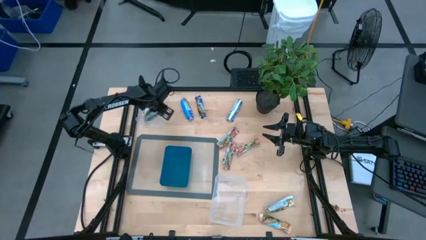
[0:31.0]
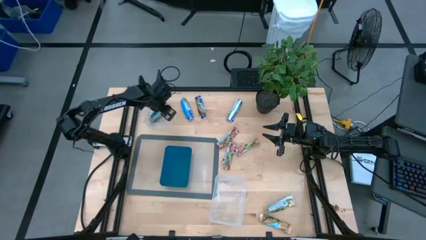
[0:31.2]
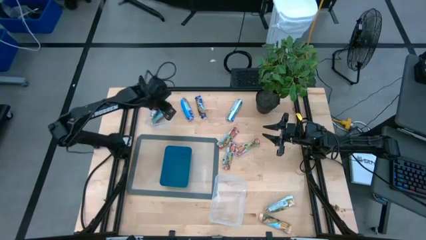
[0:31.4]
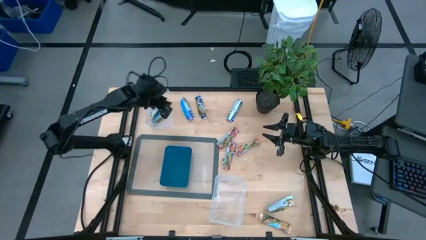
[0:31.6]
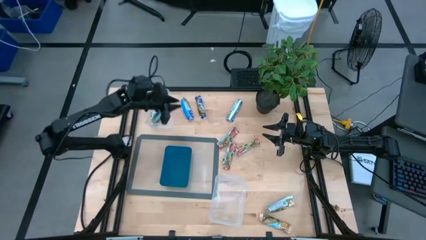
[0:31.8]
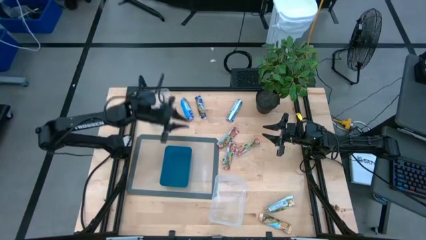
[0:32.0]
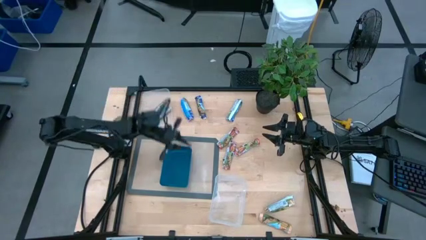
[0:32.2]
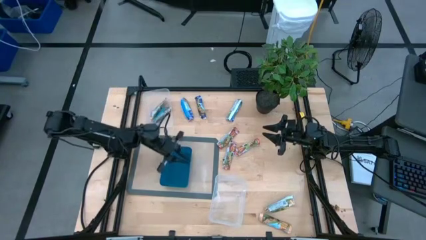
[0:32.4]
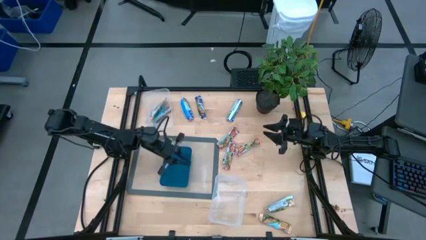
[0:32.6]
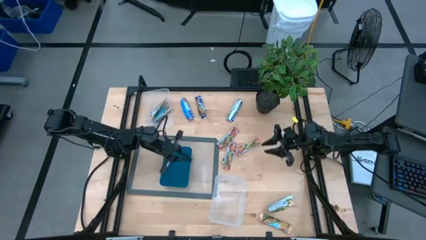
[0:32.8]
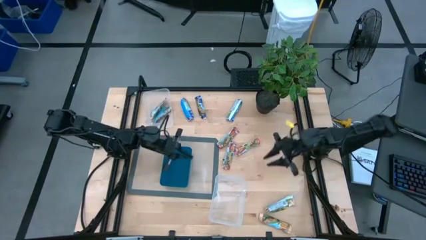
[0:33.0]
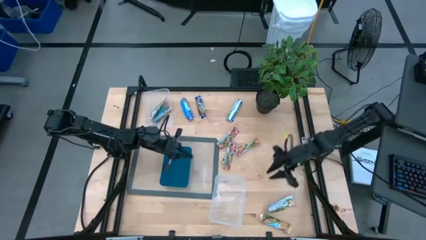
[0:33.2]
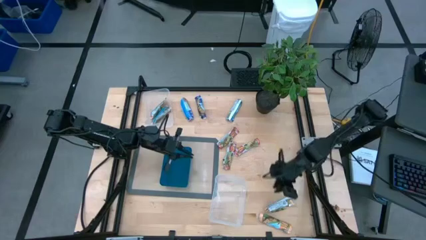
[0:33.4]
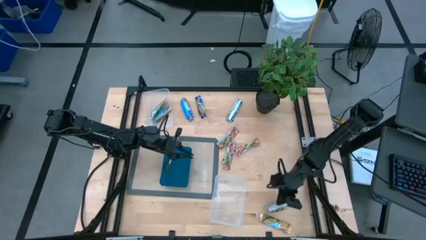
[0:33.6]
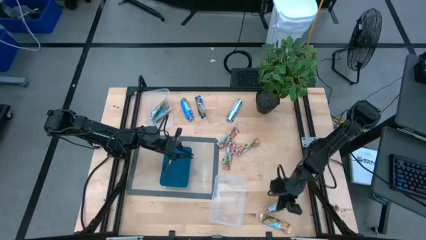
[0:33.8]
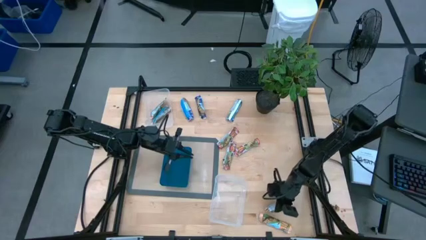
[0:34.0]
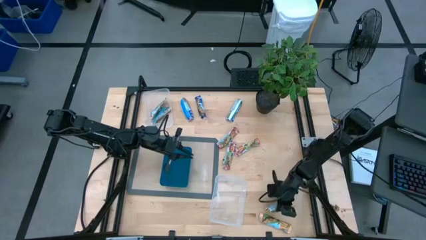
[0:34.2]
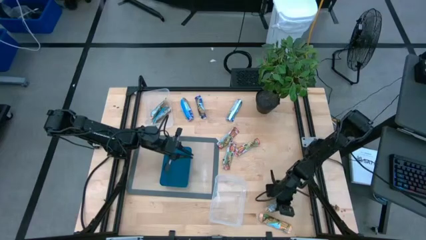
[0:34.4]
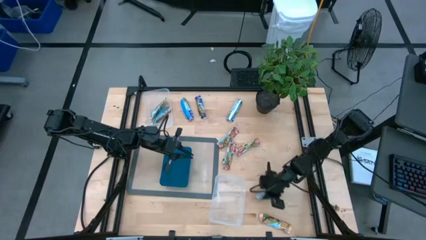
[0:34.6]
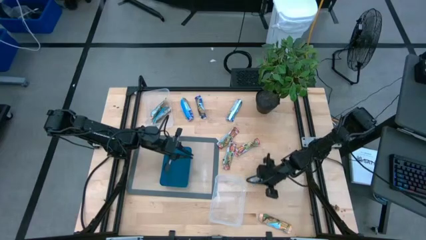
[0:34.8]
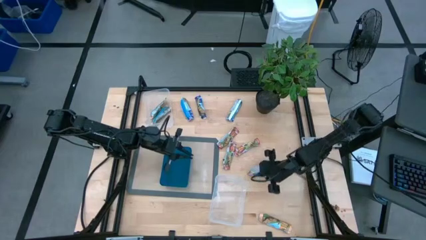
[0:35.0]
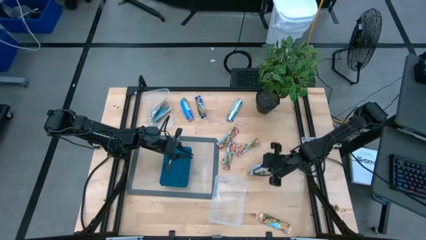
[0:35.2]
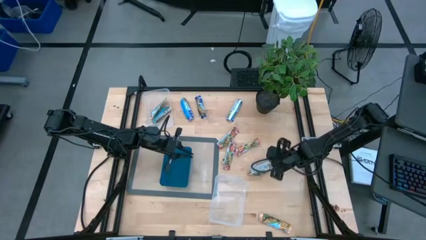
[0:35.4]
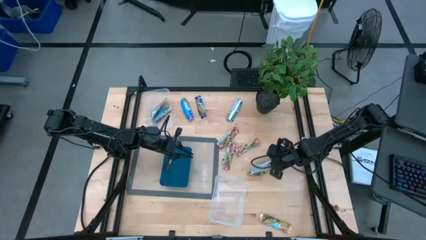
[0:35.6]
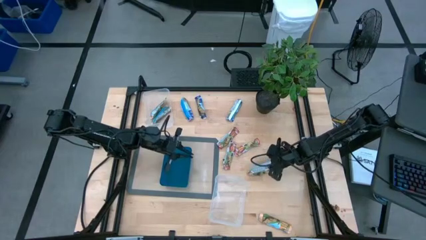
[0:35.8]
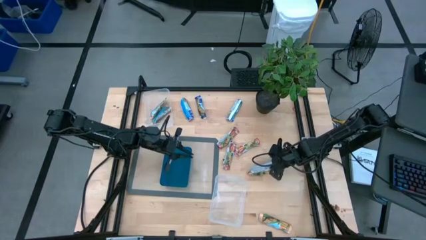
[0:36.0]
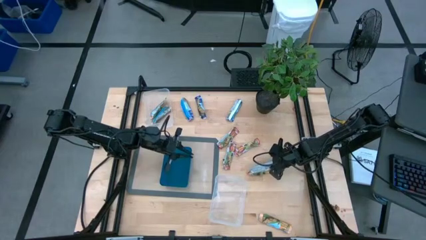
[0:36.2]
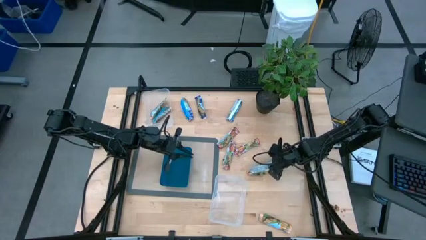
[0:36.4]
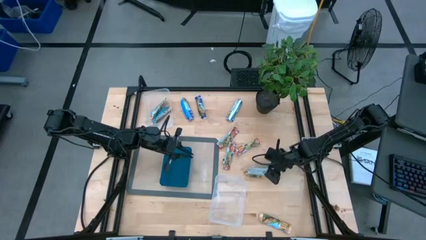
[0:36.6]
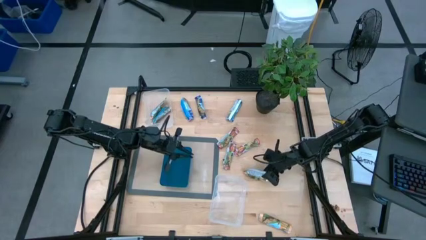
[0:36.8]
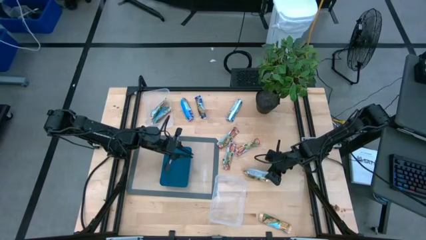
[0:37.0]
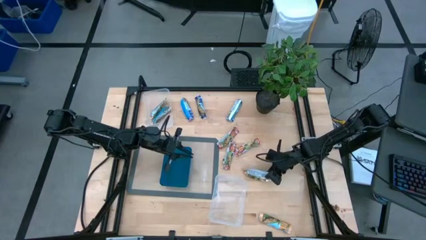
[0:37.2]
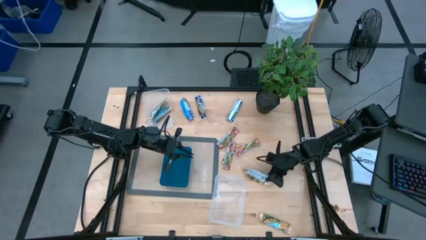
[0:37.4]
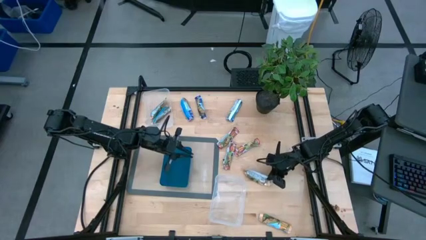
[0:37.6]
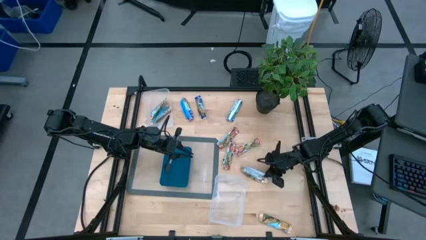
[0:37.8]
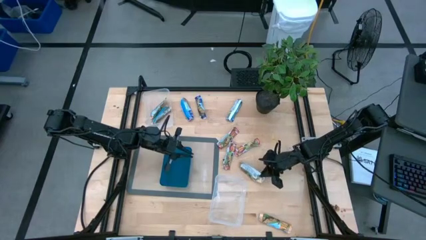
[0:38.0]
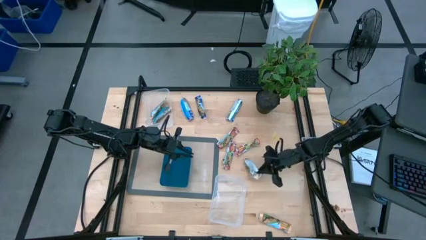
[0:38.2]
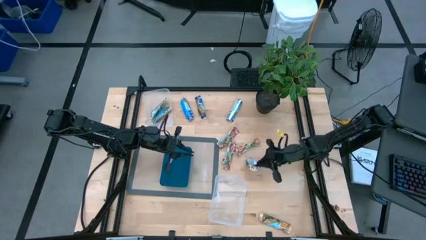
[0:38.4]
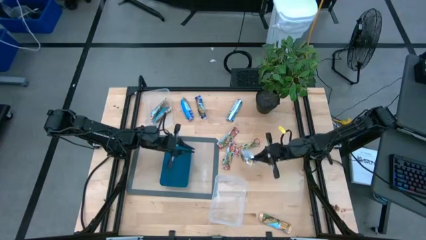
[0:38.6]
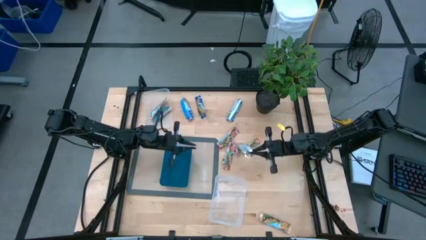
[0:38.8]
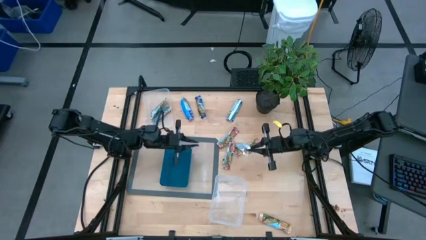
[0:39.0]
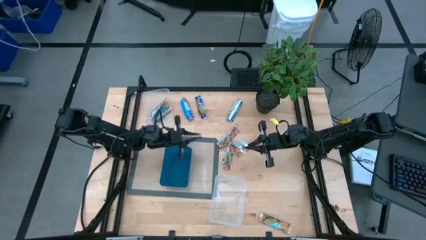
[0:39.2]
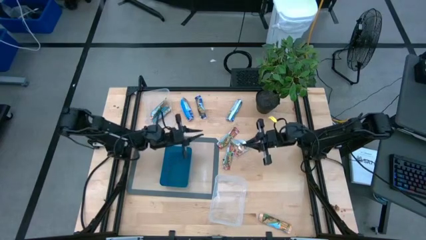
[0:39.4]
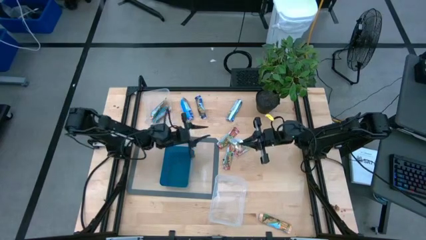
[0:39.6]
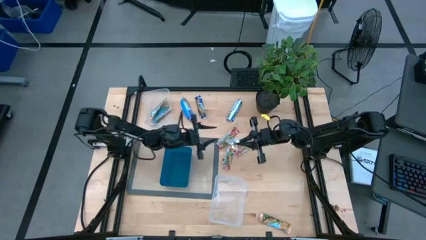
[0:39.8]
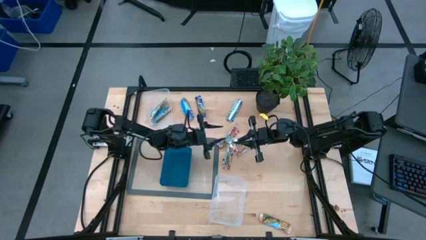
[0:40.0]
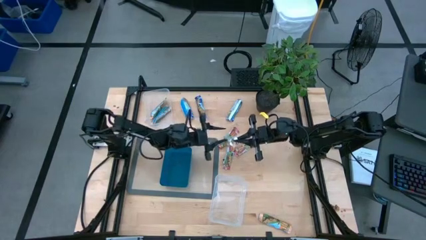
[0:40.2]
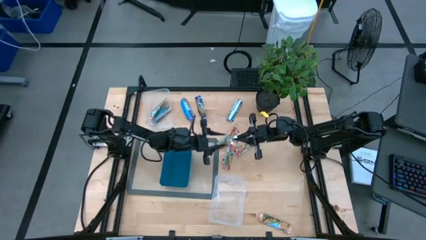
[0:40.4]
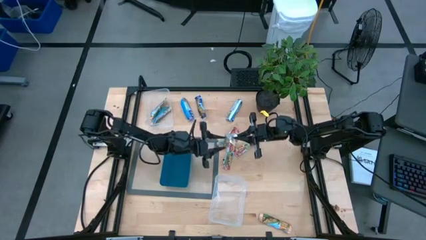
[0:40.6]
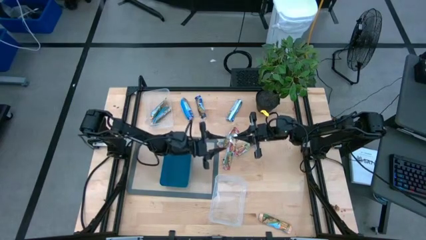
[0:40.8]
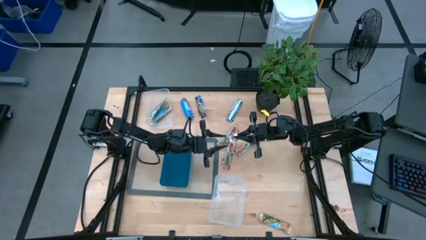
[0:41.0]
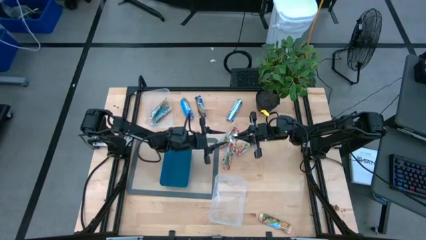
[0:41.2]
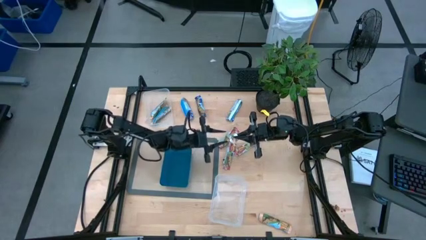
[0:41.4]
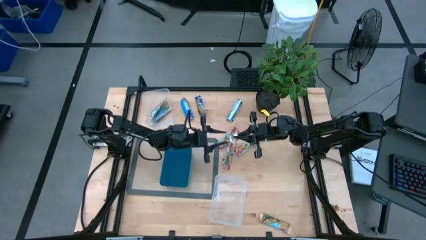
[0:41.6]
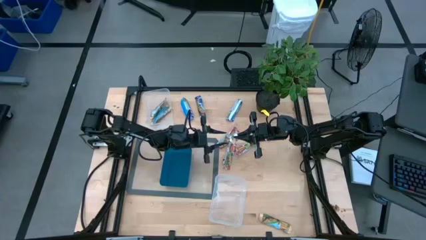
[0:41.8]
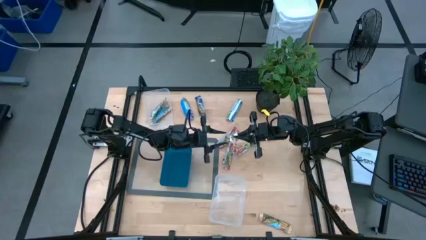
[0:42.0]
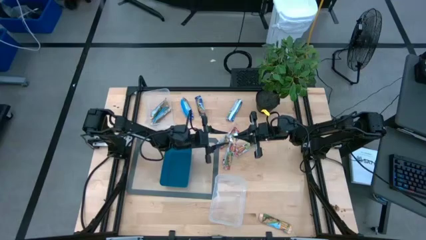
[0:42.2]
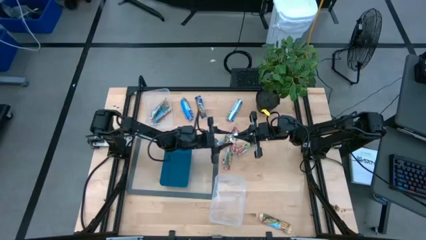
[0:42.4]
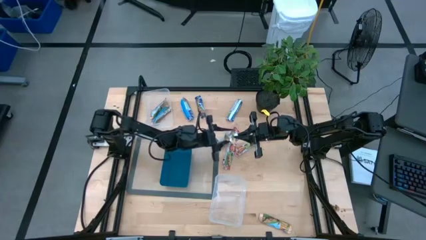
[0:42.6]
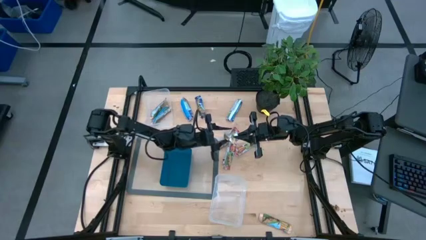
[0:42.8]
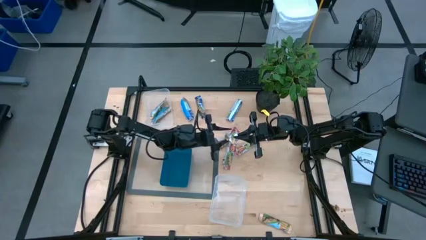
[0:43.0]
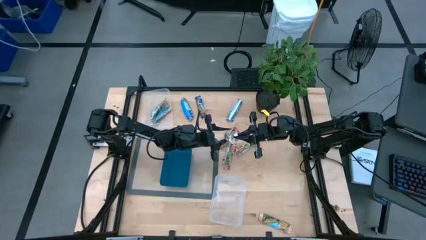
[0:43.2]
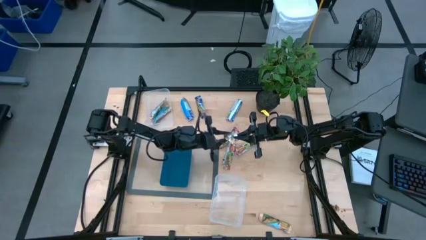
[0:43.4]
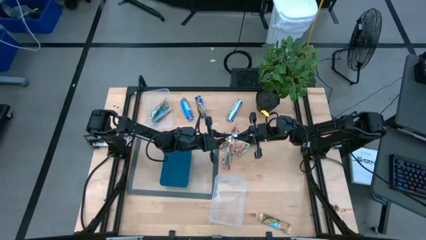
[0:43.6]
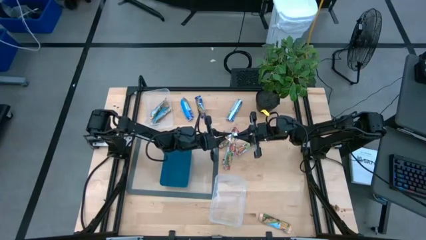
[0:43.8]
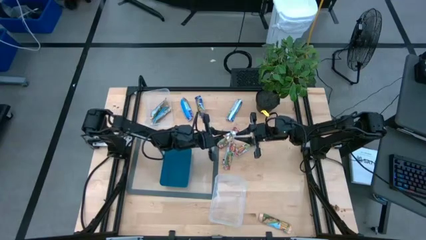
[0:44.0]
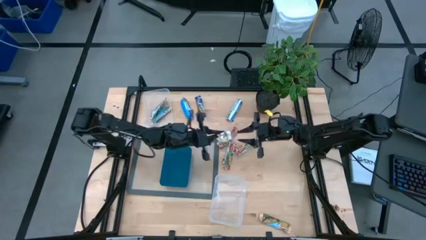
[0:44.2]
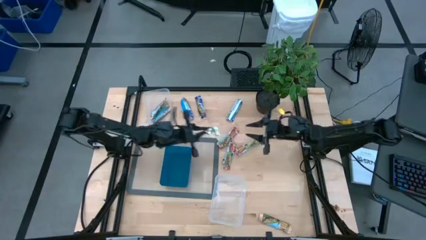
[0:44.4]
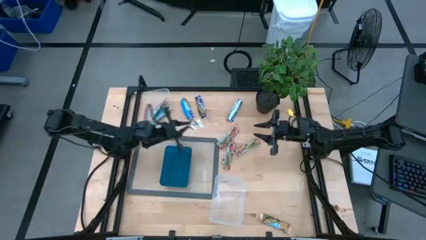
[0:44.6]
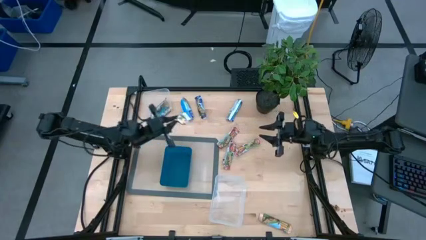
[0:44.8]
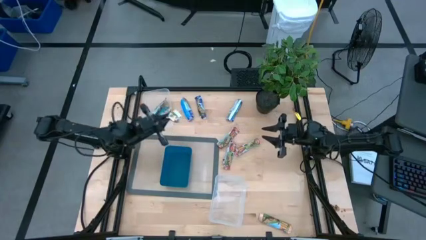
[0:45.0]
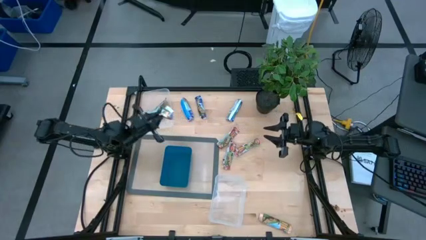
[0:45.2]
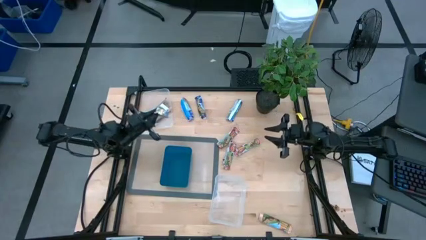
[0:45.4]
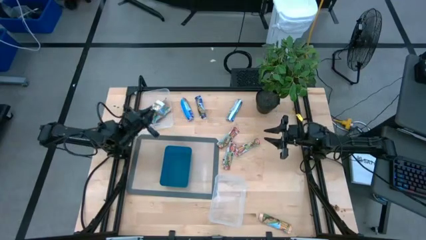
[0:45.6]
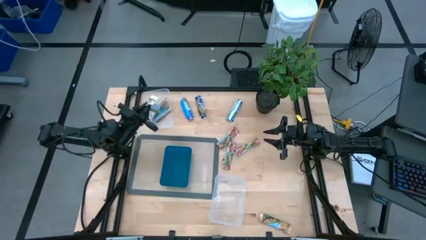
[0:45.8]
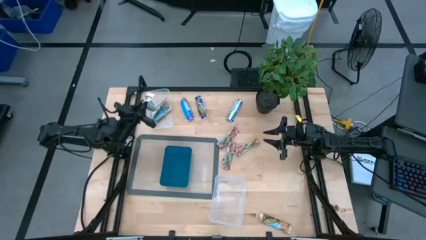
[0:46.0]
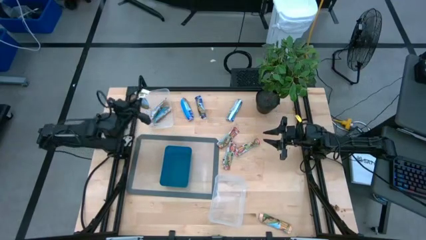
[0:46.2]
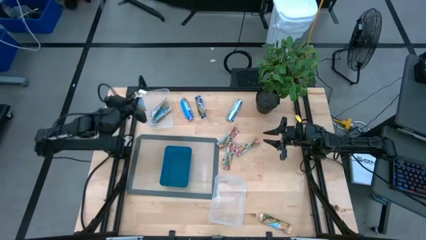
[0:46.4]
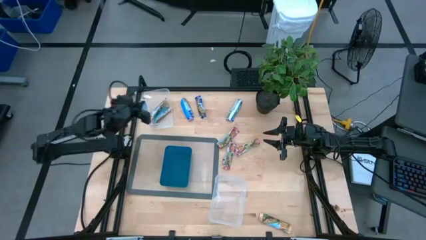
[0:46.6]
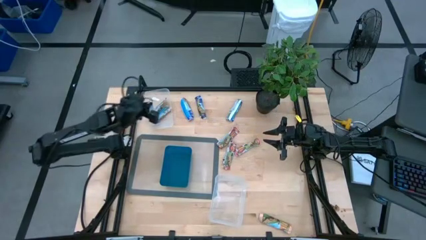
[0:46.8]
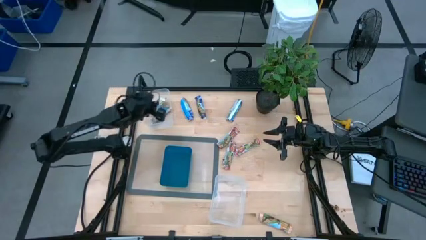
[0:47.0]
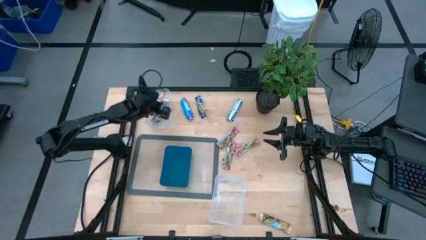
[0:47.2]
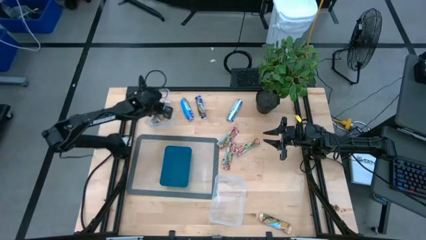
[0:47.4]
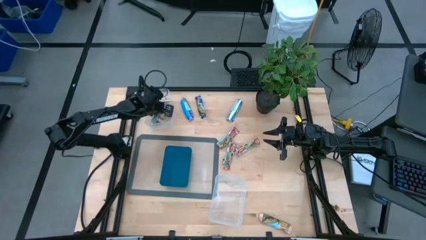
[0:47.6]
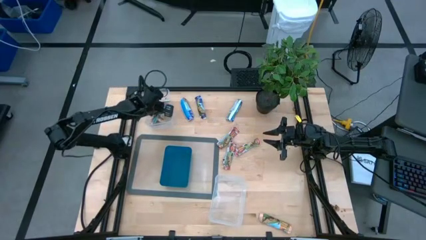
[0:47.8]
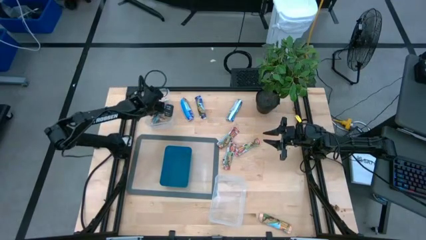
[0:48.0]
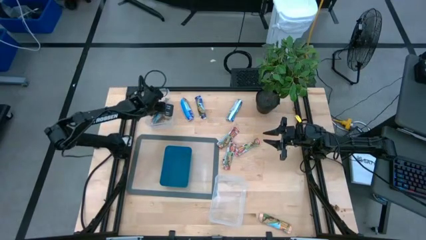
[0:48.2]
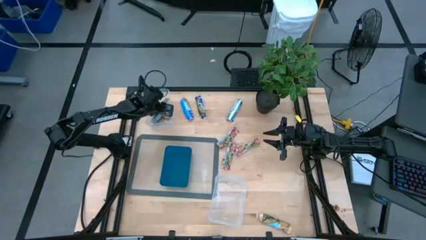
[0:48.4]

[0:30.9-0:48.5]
Task: Pick and place Granola Bars by type
Put the yellow granola bar into the top transparent bin
